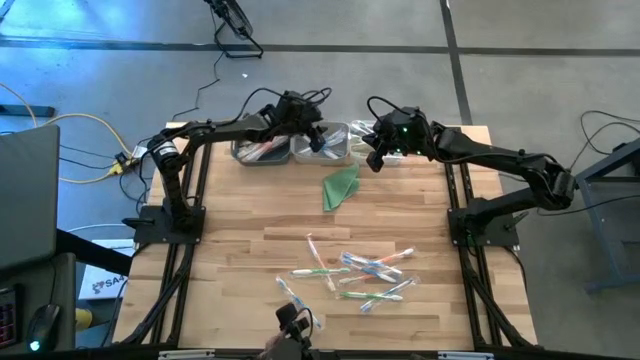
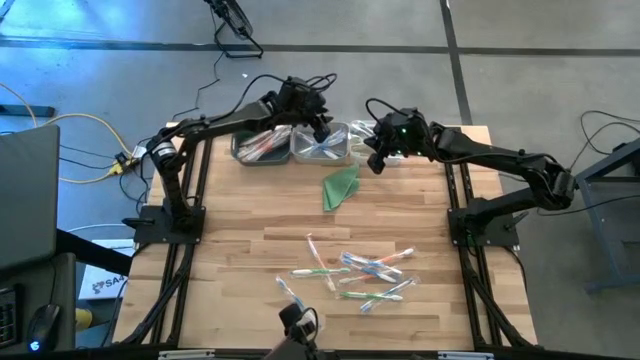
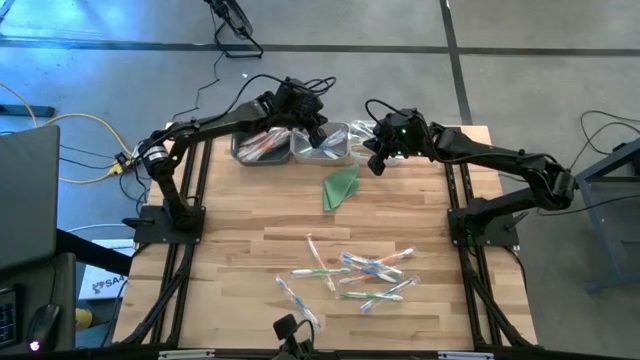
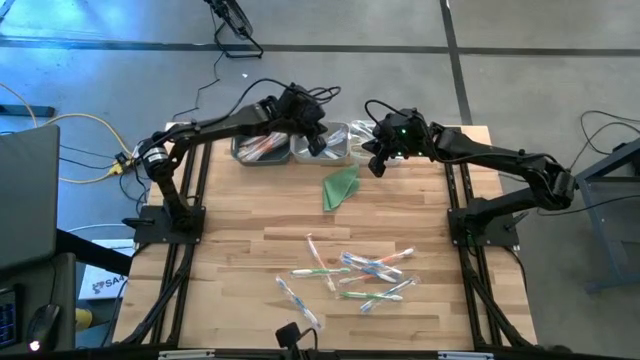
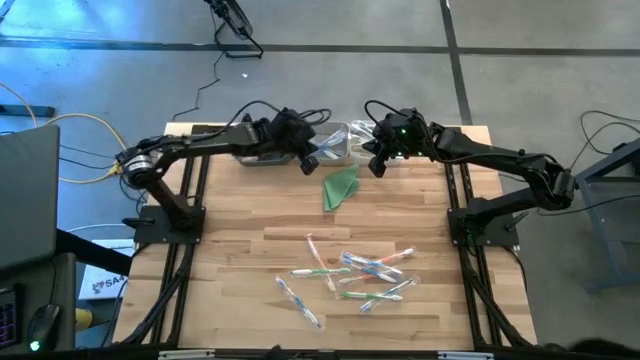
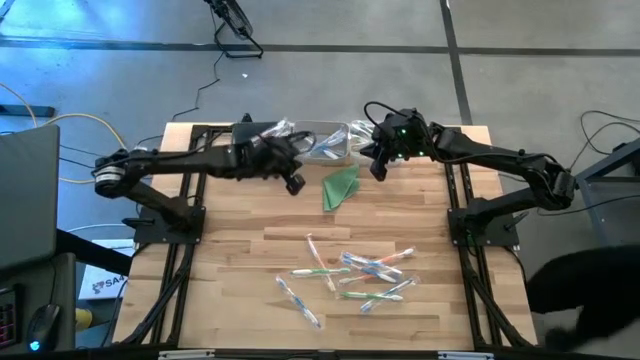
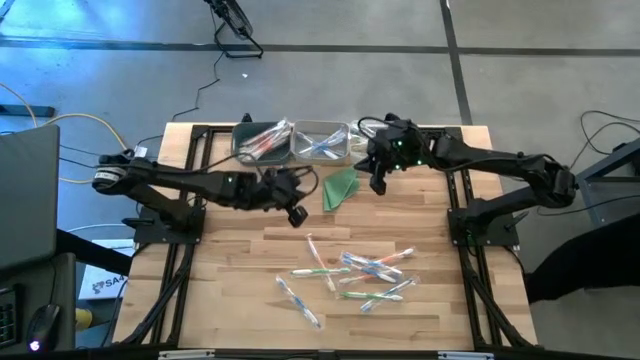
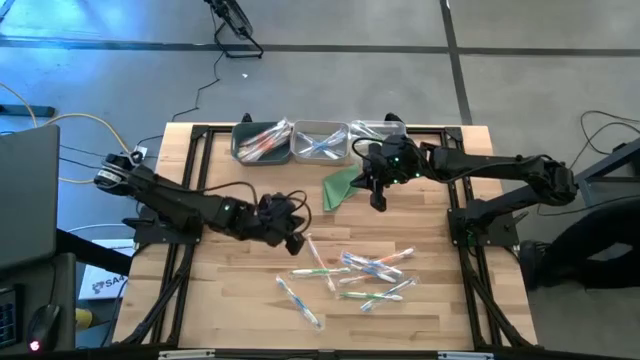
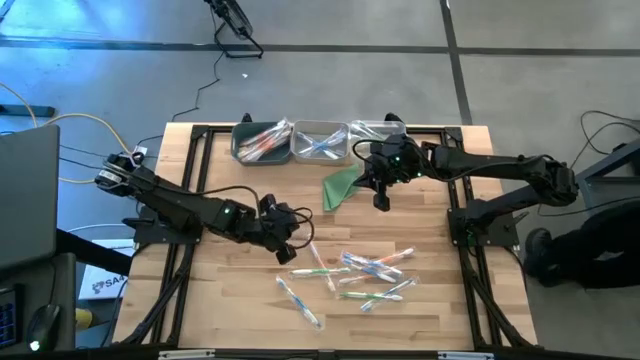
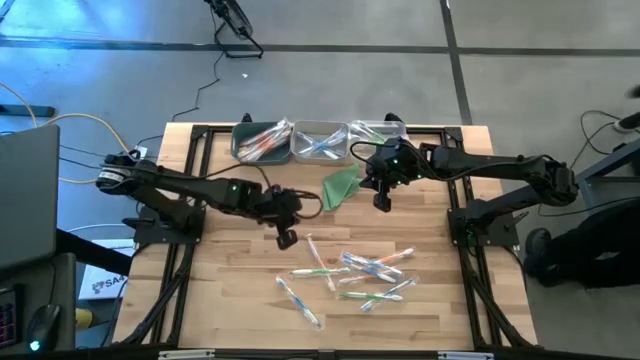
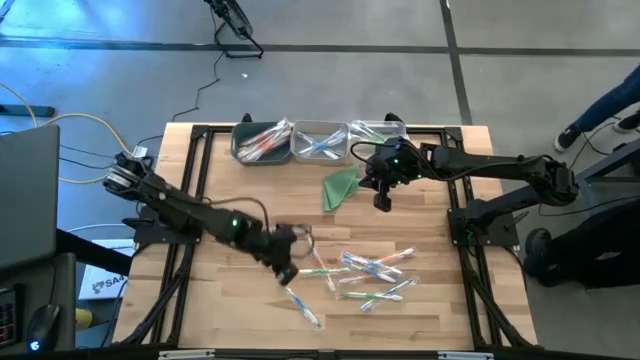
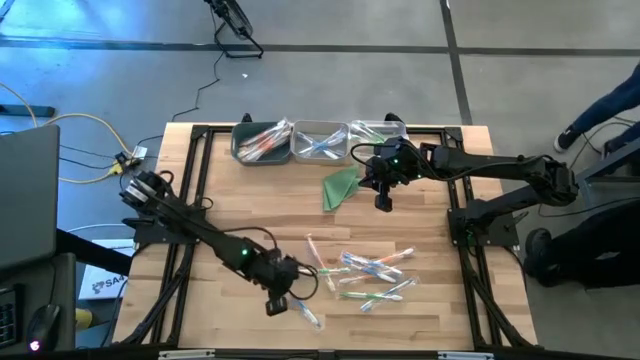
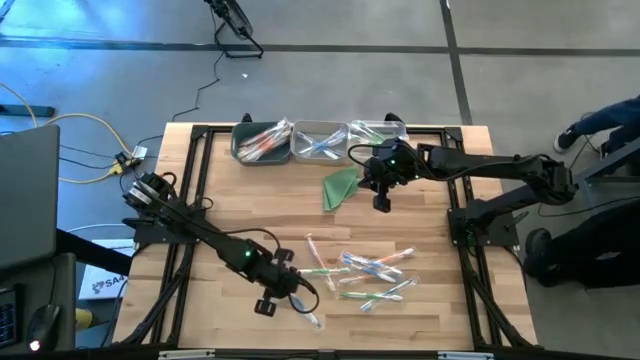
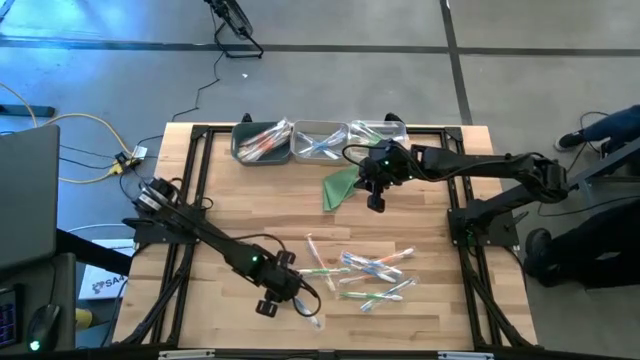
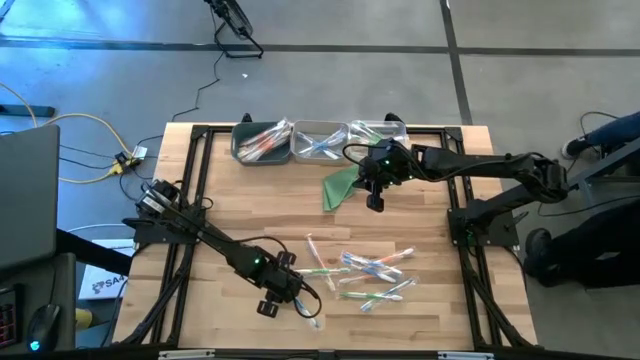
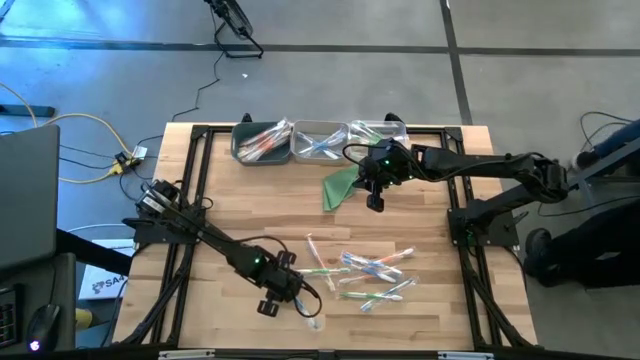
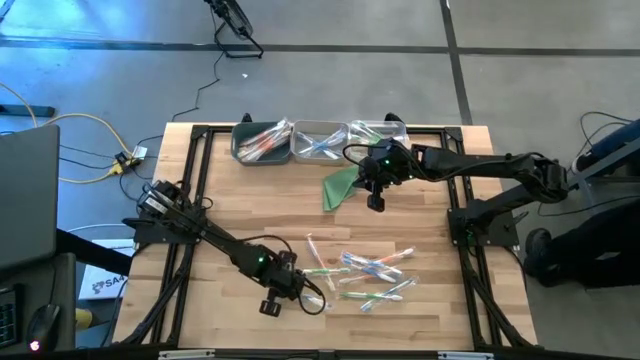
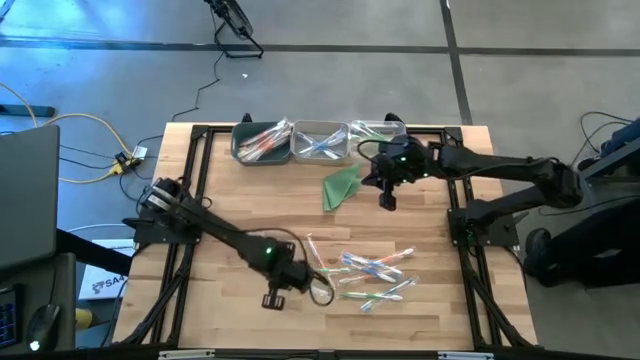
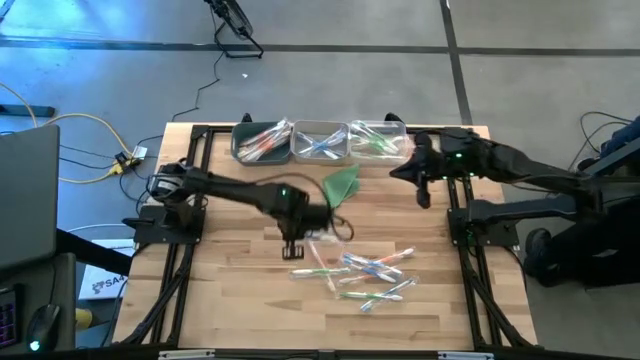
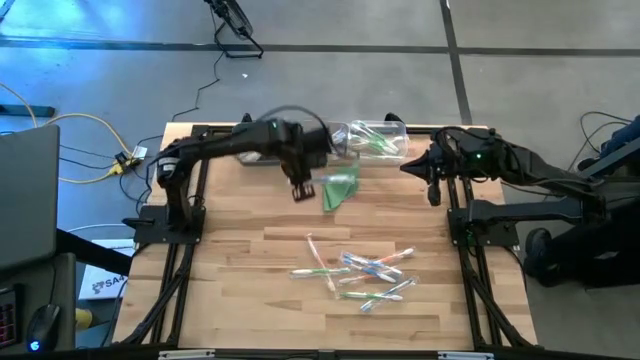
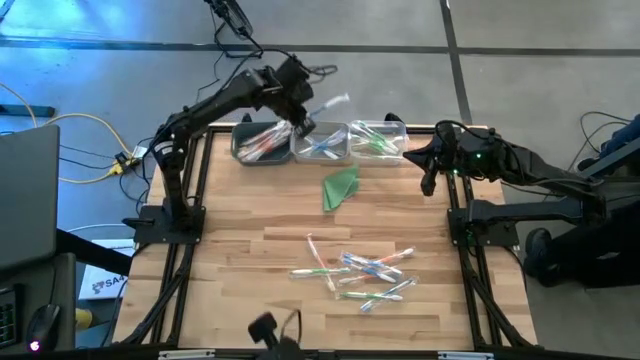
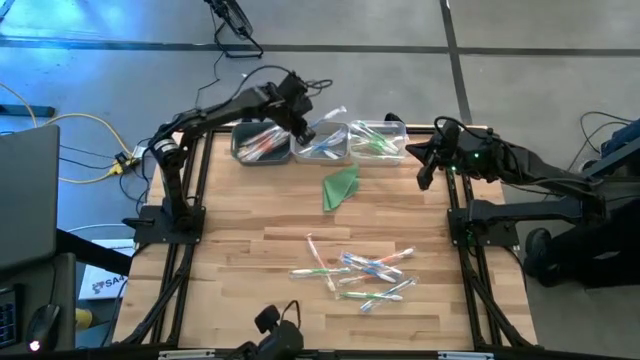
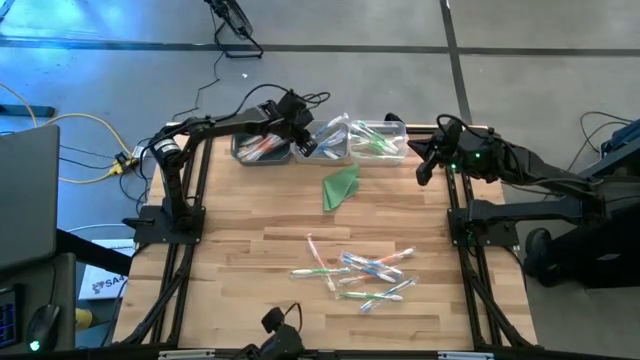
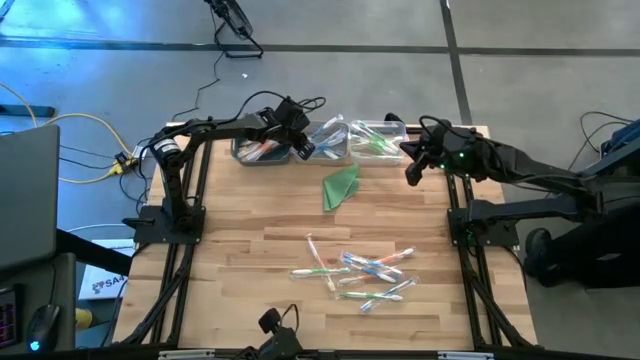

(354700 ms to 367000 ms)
Task: Pick & Place Toothbrushes
Put the blue toothbrush into the gray bin

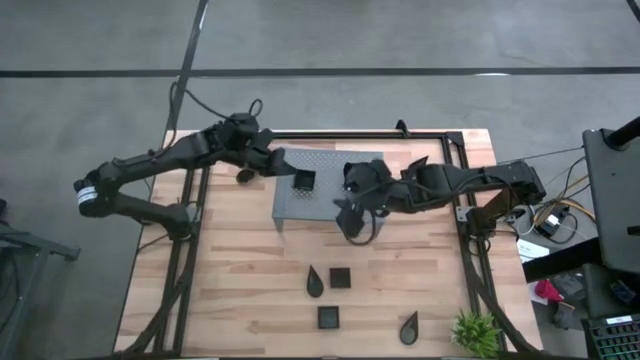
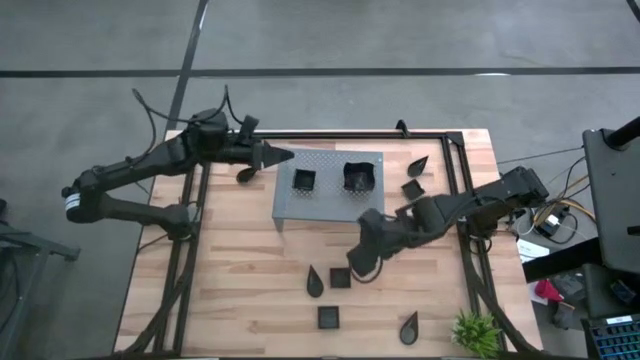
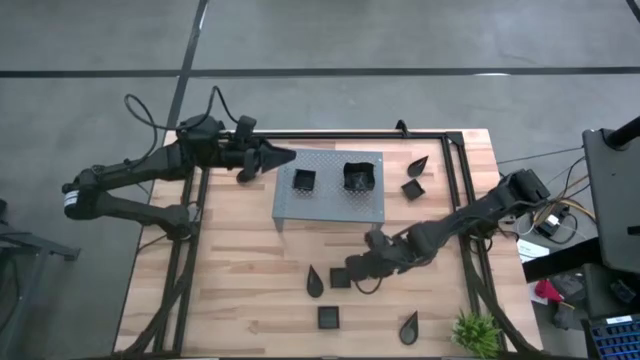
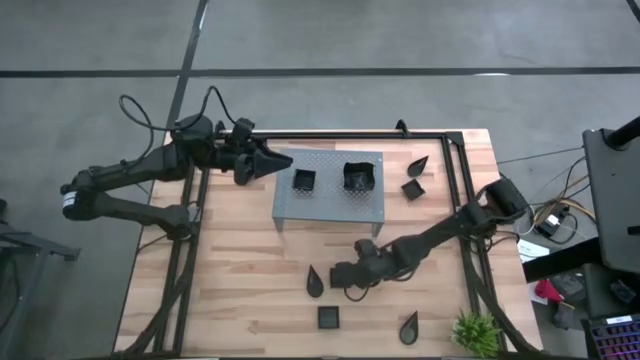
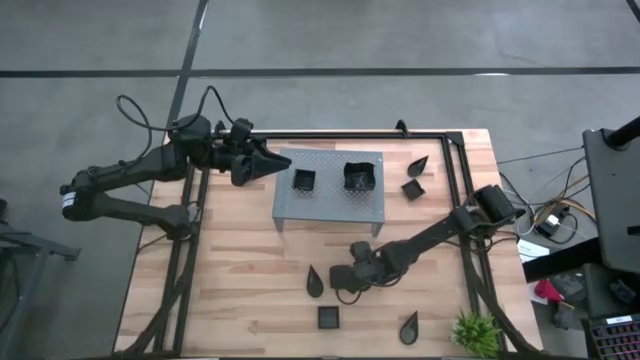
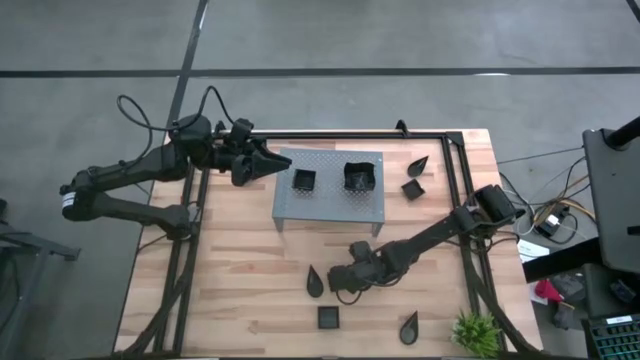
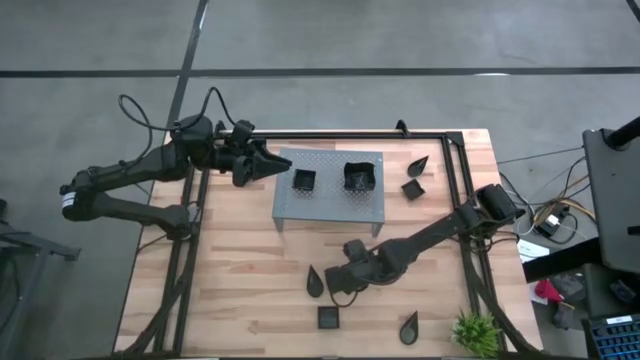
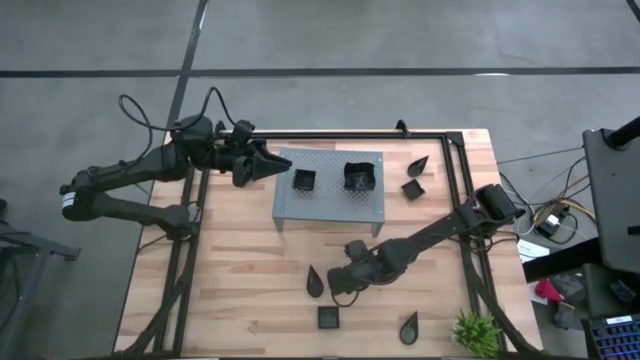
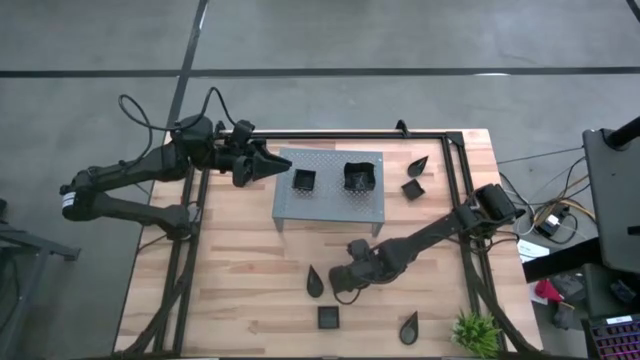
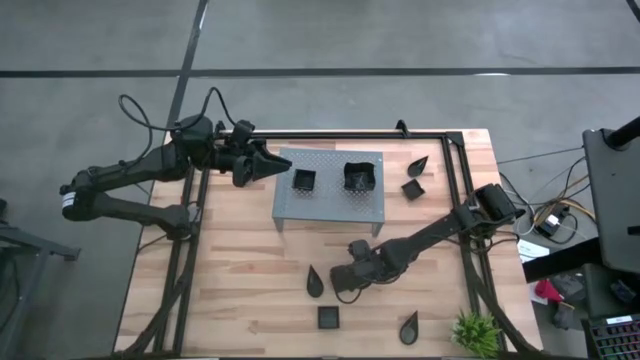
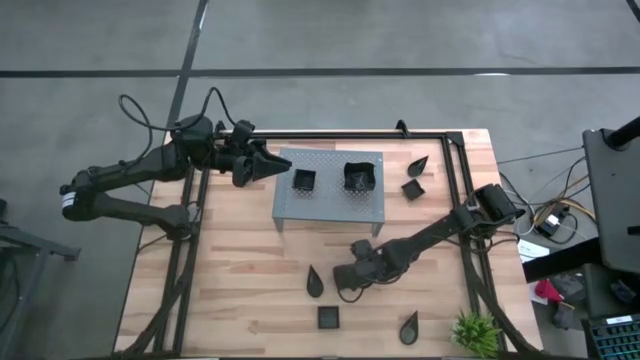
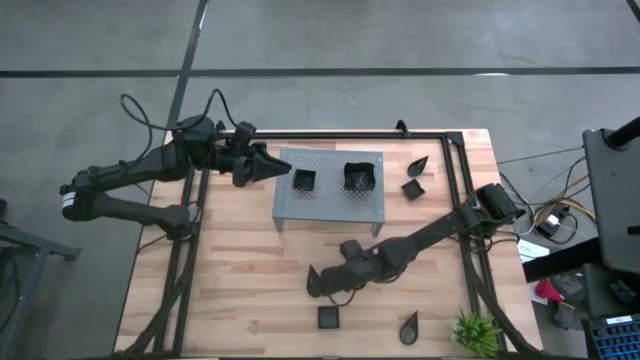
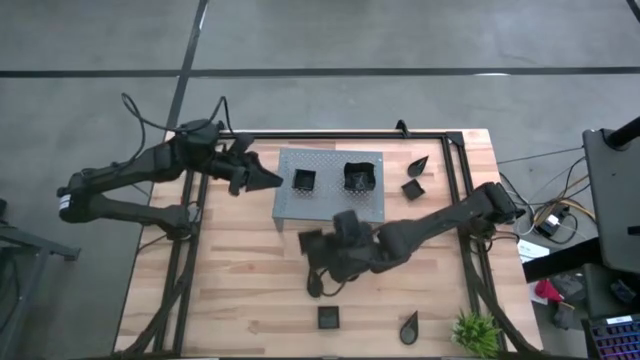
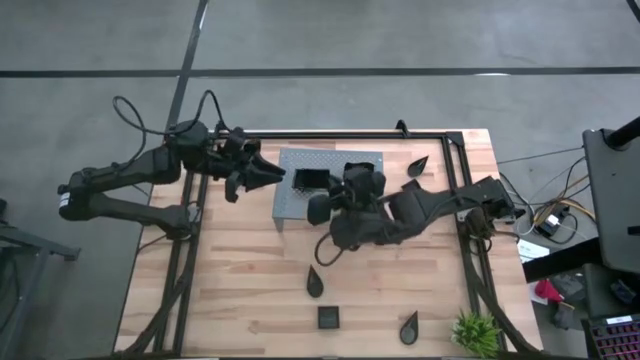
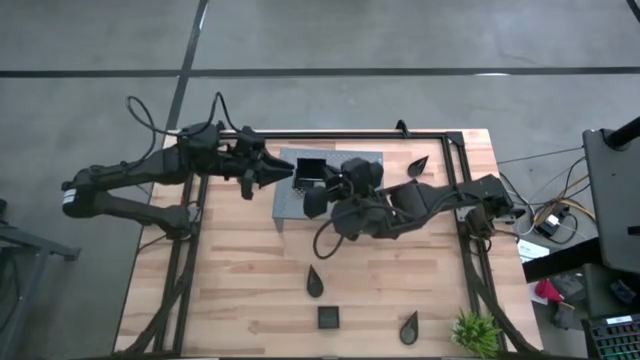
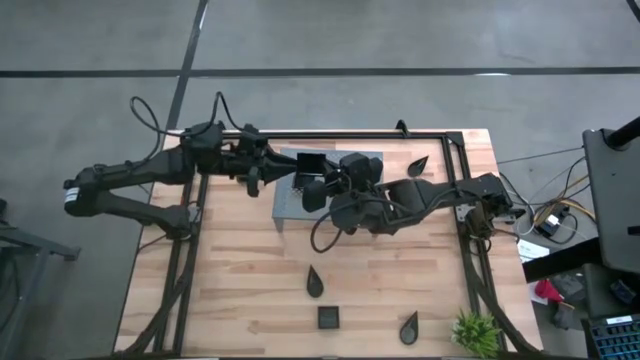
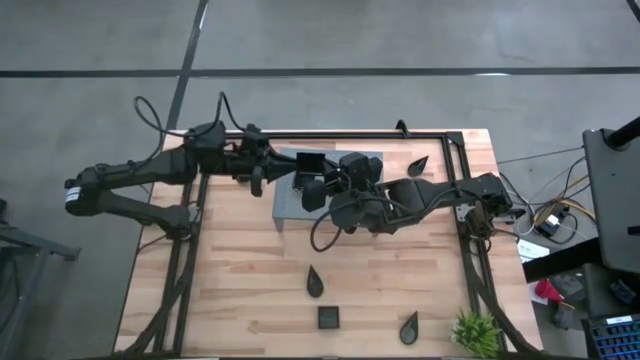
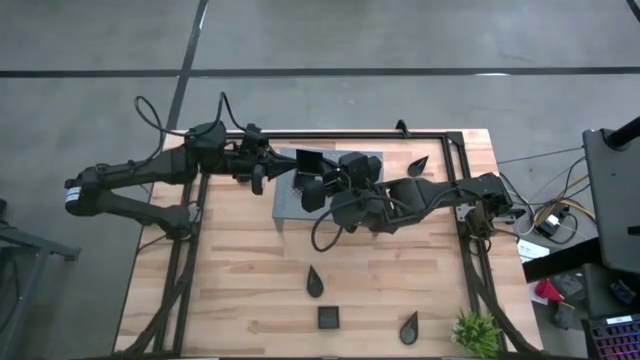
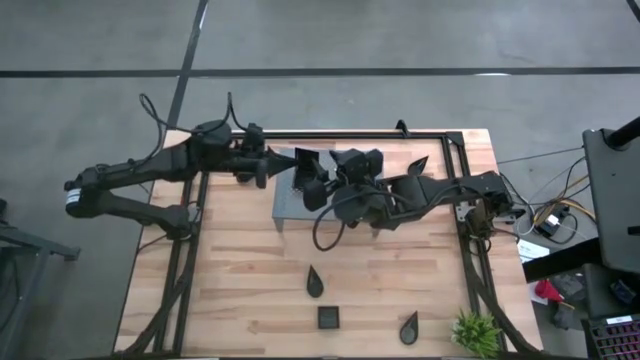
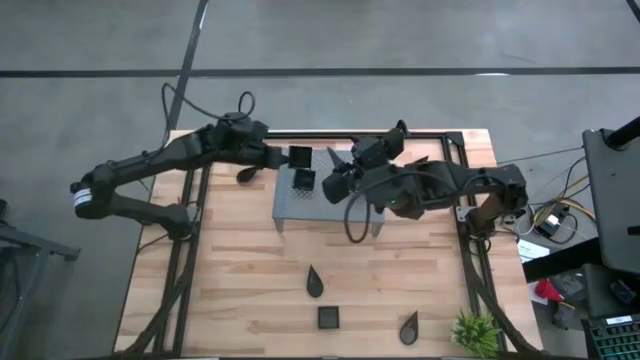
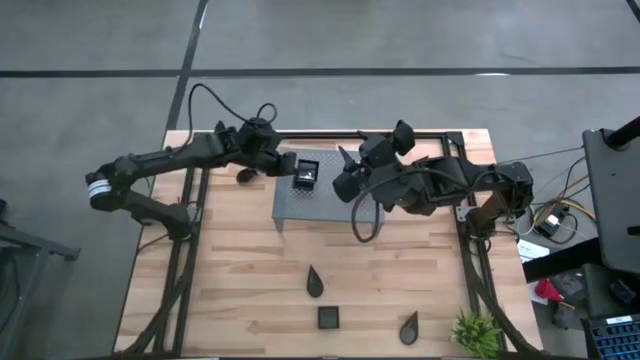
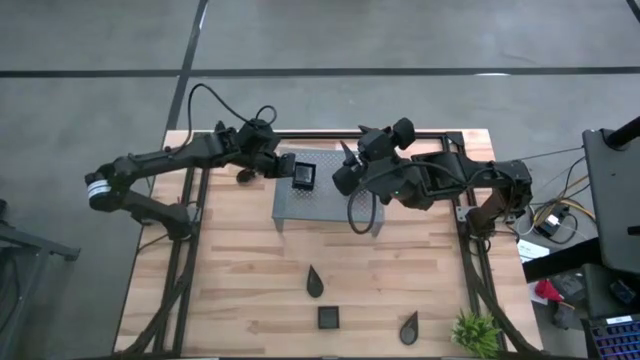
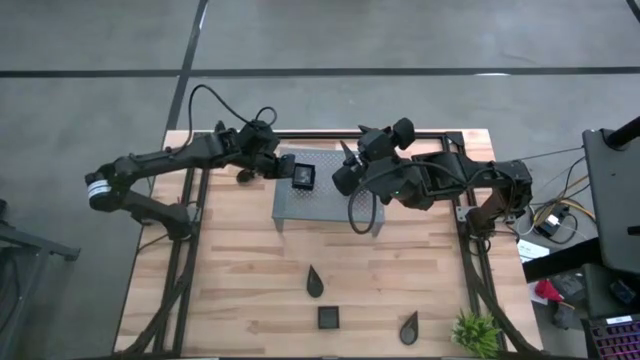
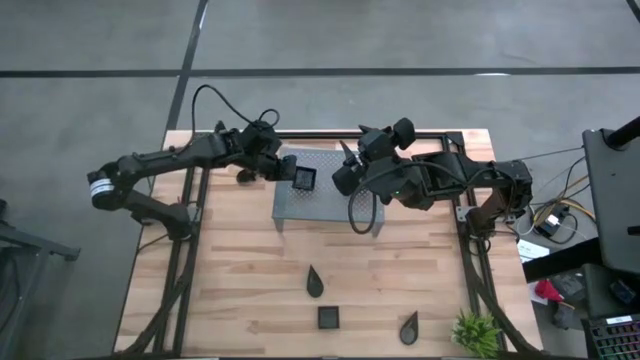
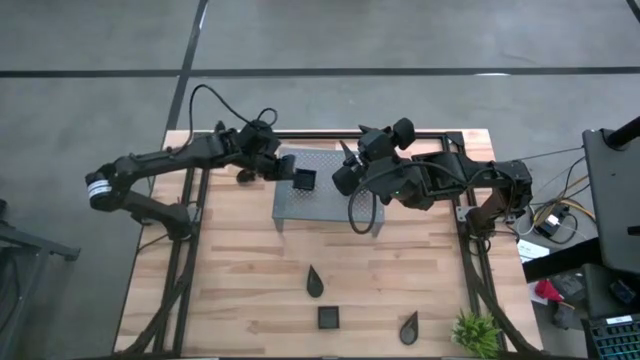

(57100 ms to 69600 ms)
Task: Pick & Place Mini shaped plates
Stack the black square plate on top of the other black square plates on the shelf
